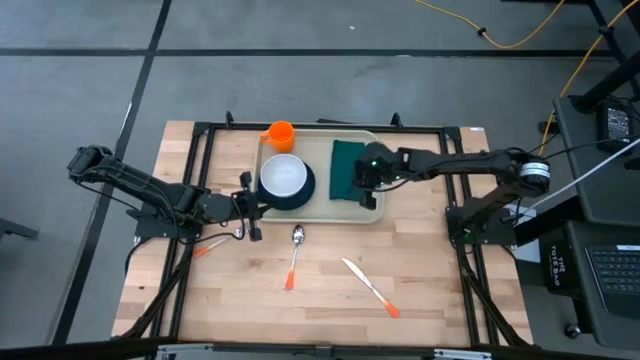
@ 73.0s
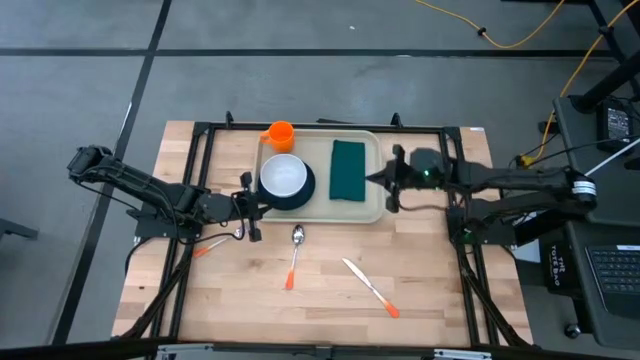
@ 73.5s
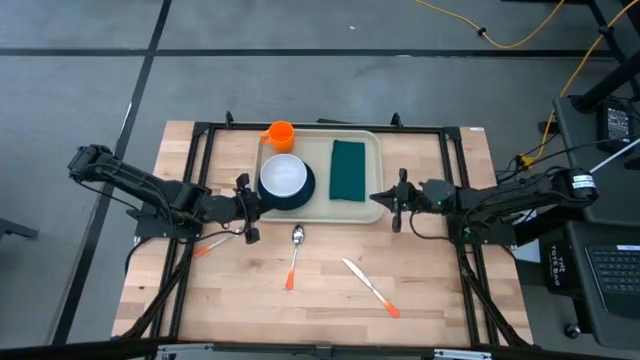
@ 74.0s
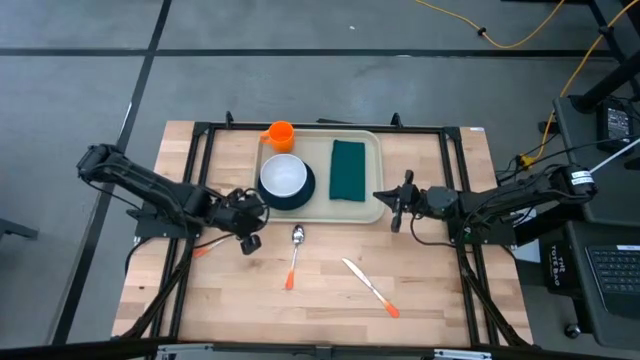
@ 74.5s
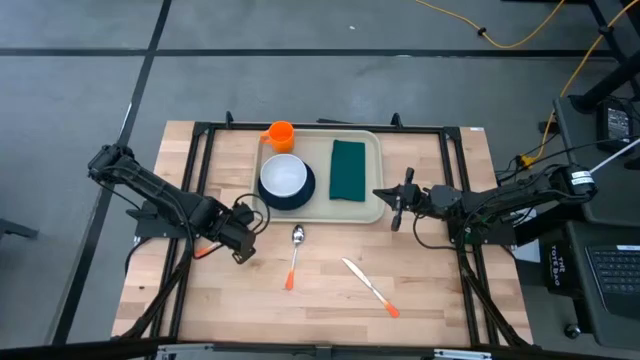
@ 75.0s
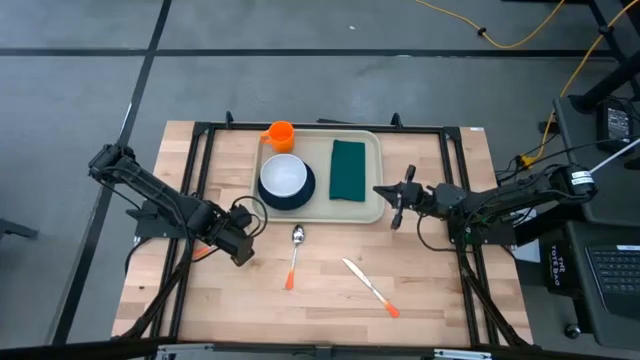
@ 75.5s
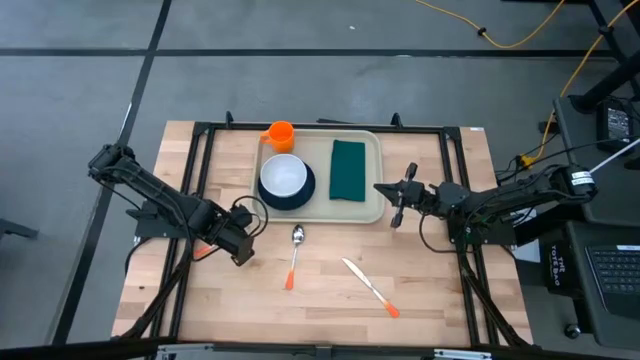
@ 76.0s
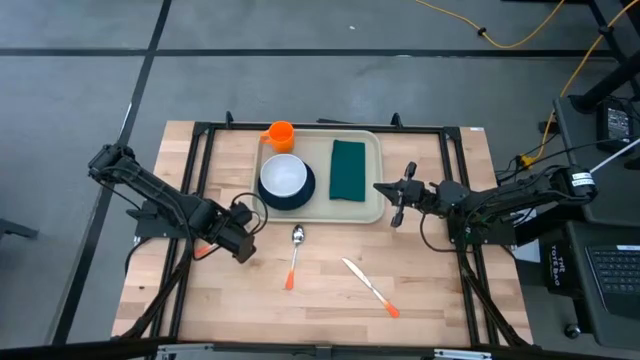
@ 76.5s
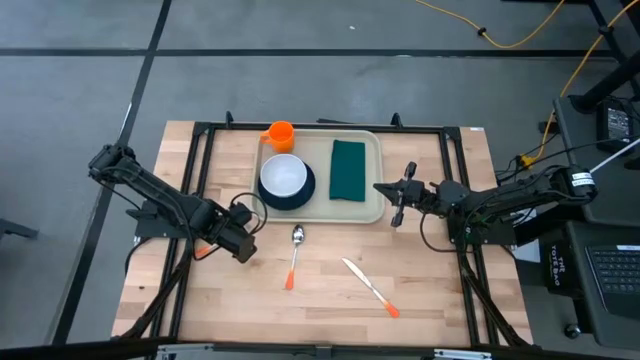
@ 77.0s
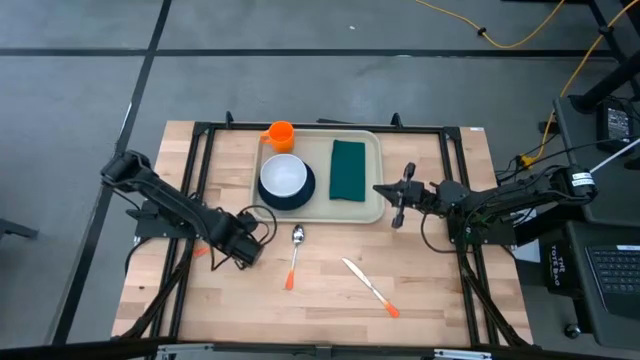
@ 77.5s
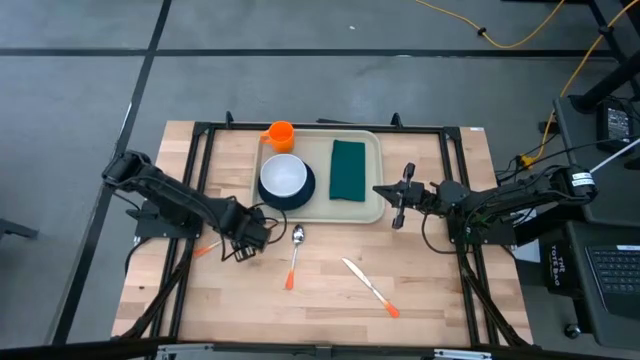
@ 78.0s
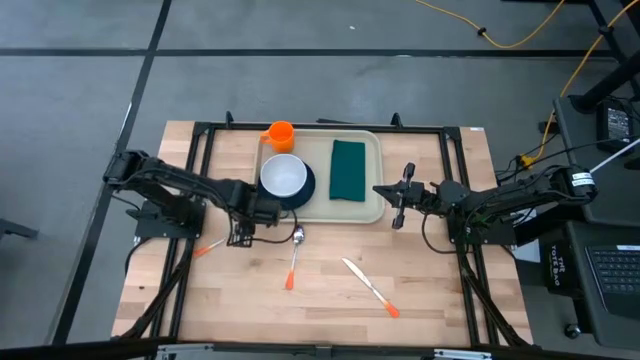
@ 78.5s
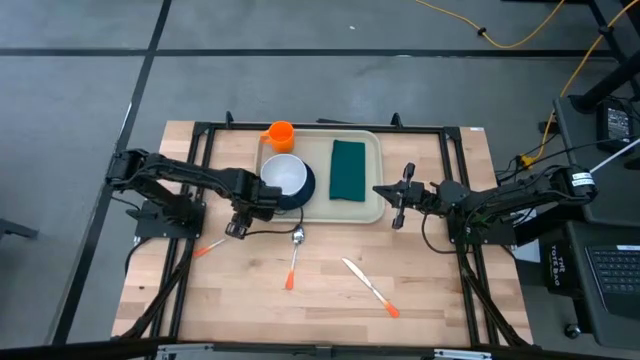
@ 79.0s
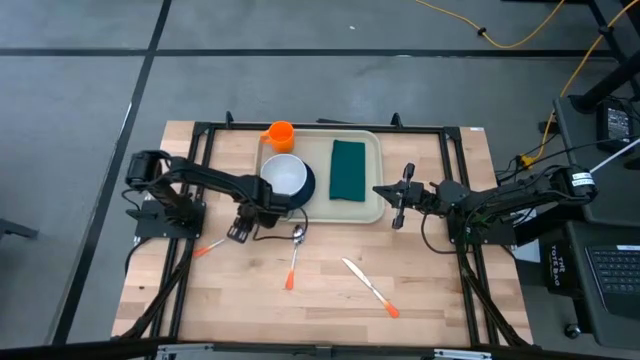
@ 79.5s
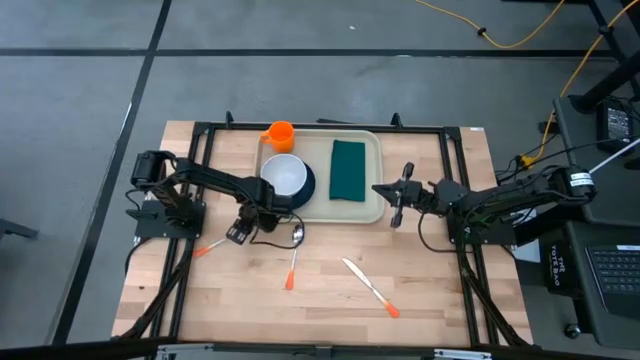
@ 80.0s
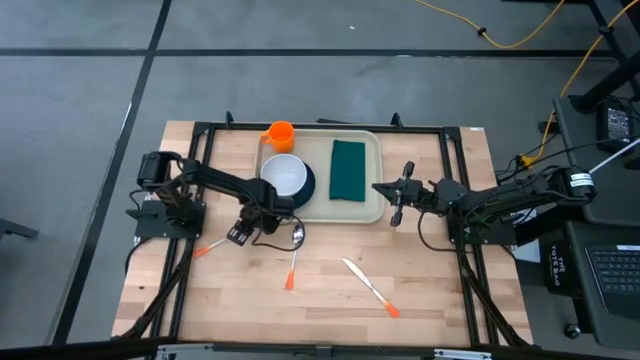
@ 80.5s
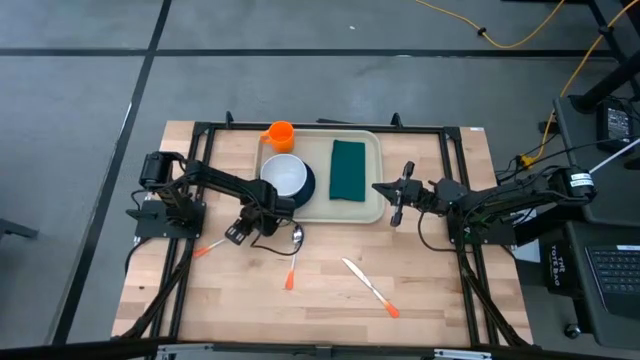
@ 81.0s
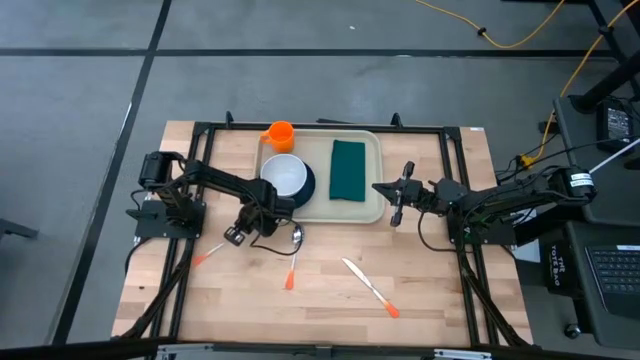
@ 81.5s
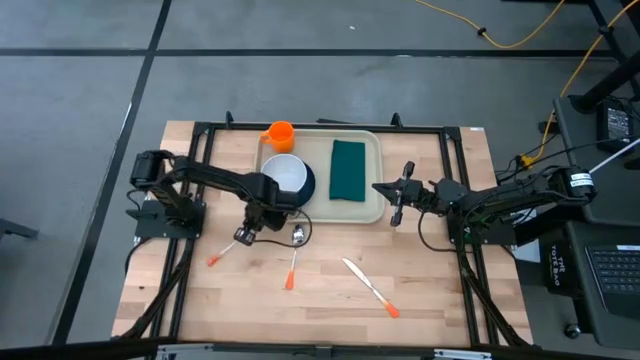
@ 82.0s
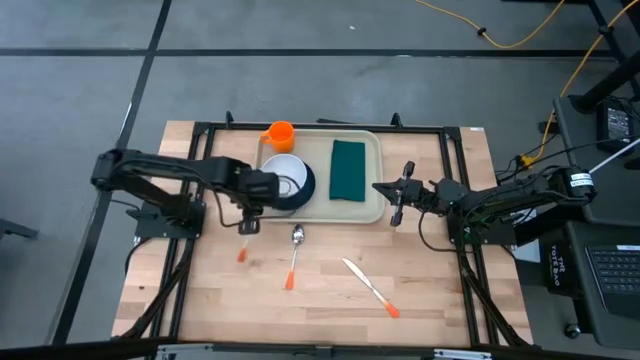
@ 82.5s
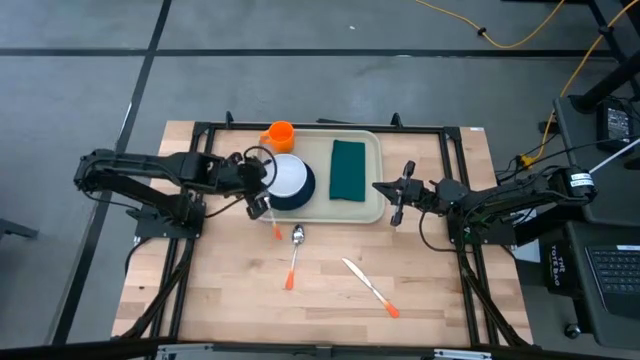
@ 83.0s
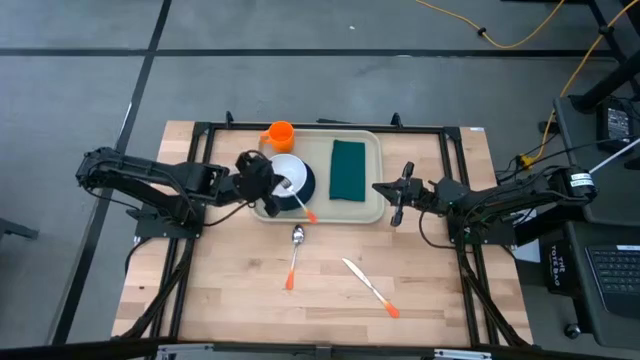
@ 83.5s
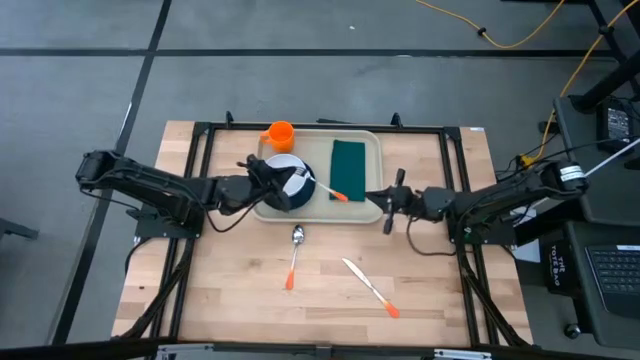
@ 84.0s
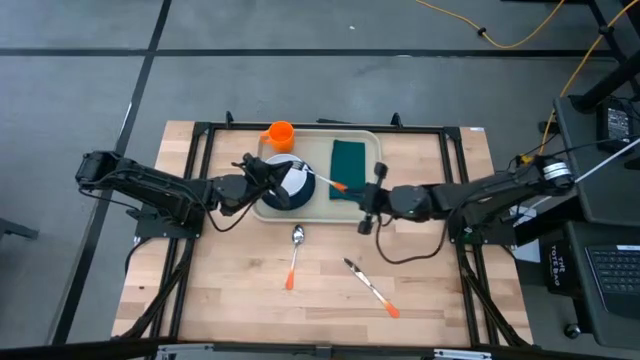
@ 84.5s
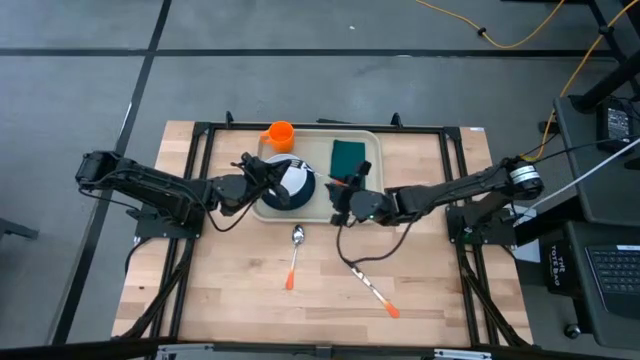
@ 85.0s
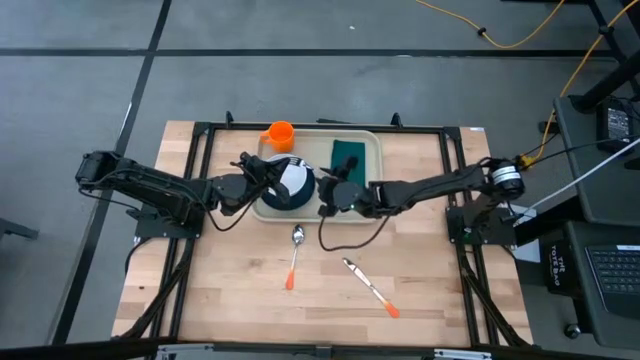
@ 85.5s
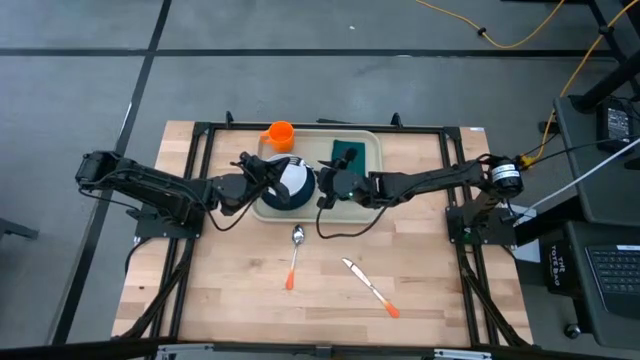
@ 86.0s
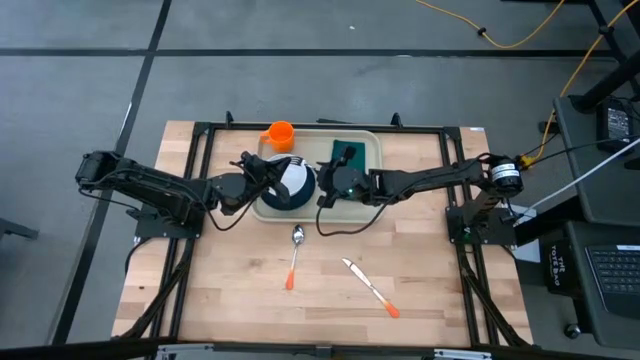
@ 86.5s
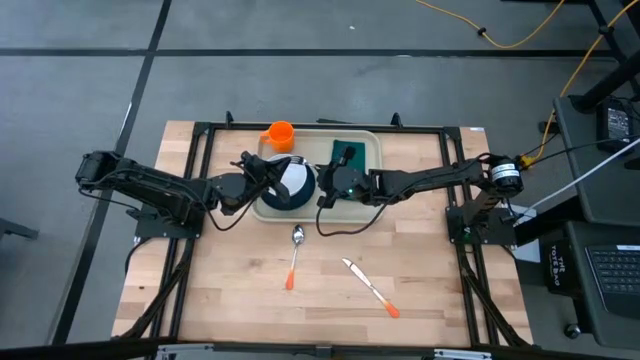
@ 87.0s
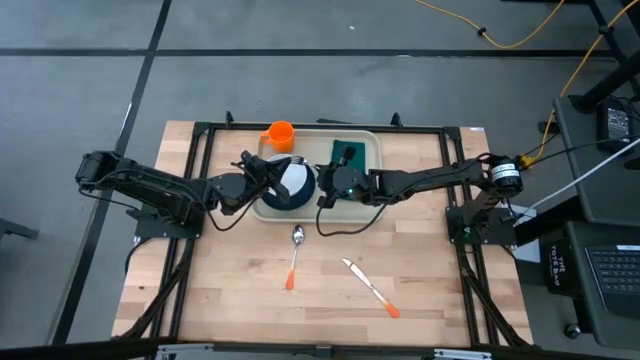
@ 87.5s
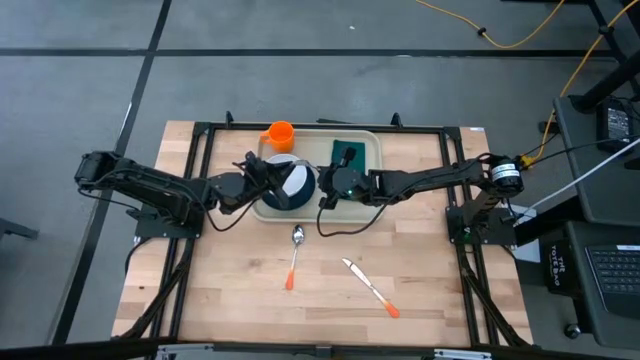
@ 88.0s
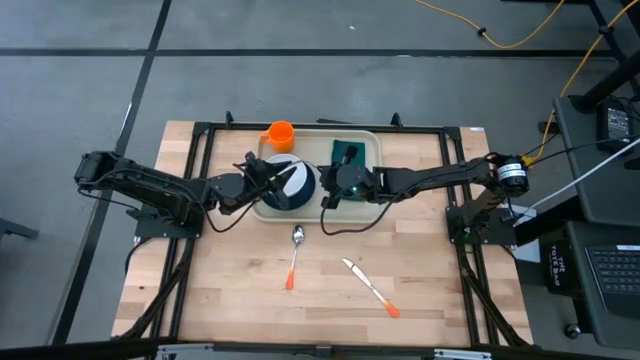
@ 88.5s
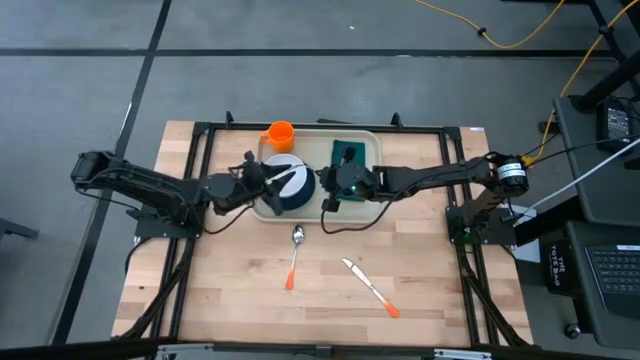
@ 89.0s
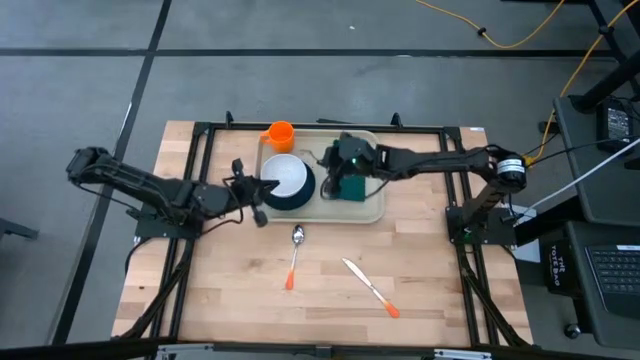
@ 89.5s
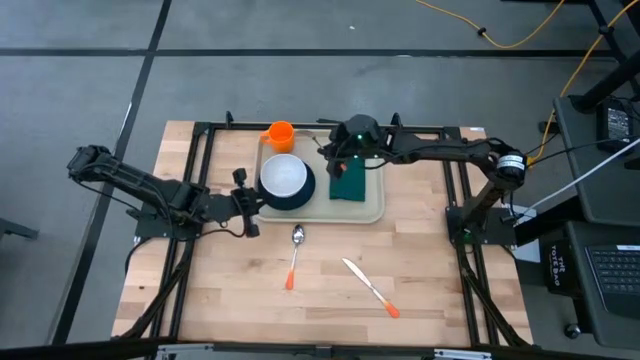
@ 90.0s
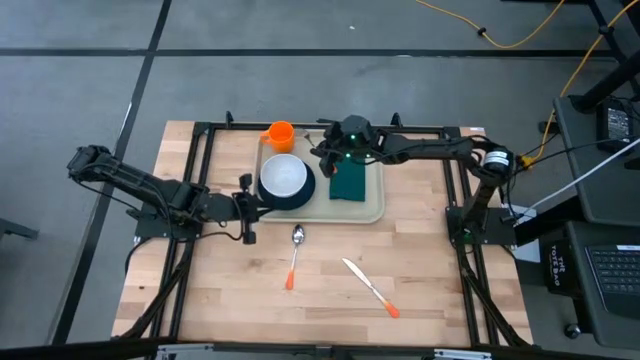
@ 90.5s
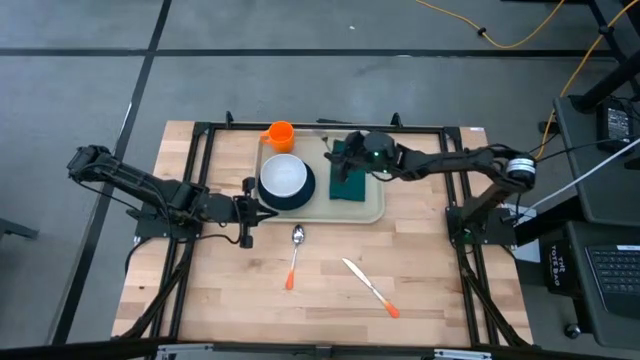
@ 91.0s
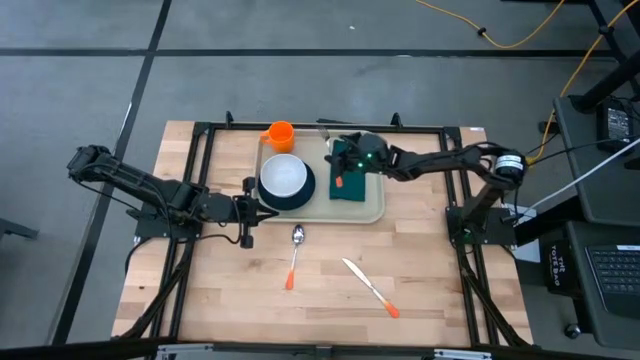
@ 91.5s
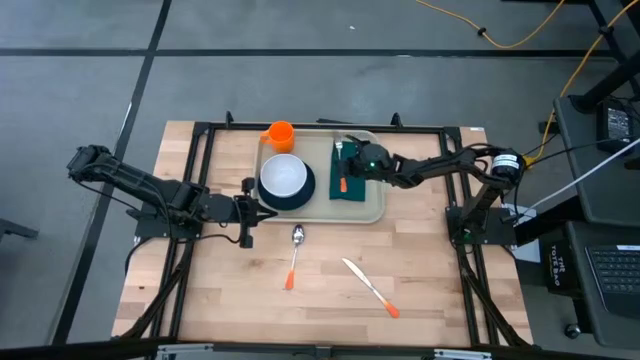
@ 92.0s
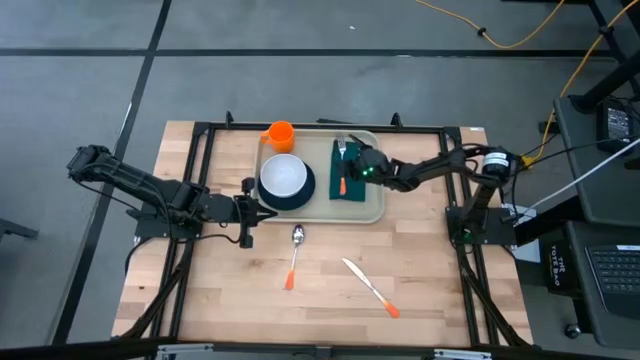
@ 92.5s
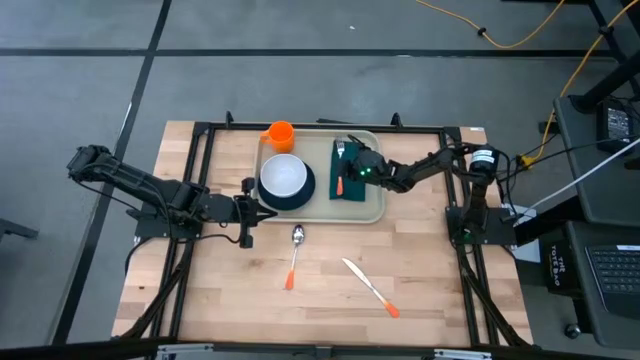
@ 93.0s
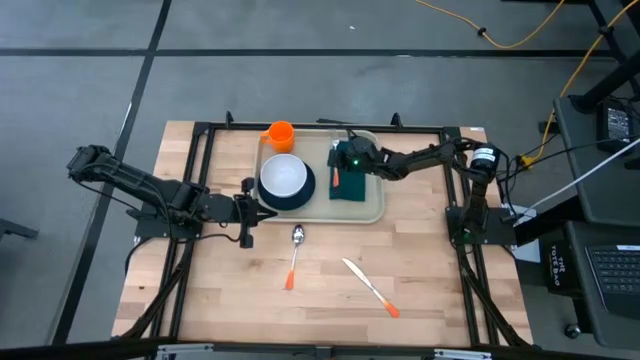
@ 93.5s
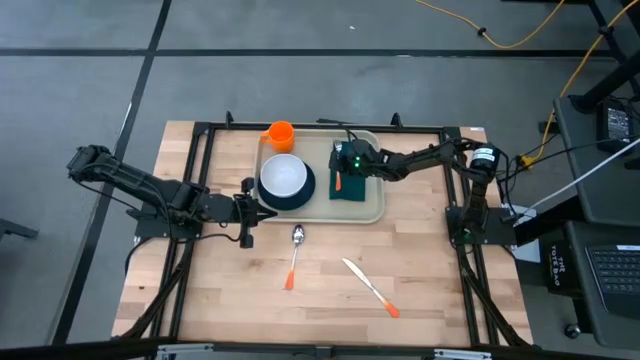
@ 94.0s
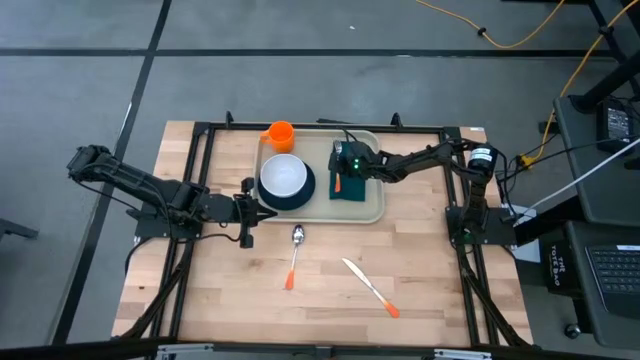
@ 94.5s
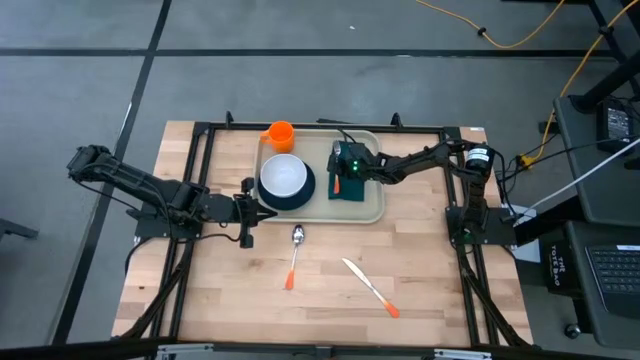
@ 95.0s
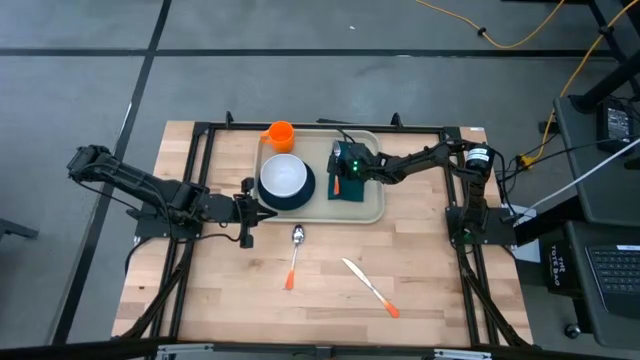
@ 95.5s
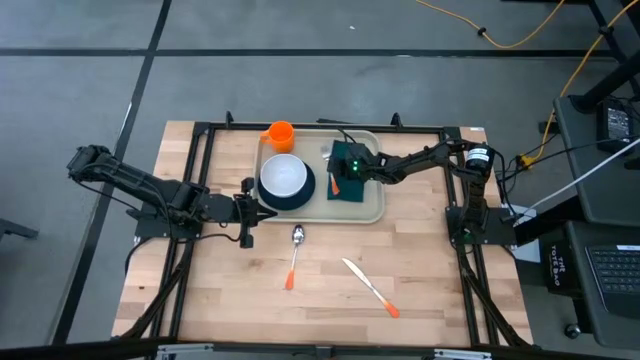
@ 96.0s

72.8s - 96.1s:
Task: Set up tray
Put the orange fork on top of the green table napkin on the brown serving tray
